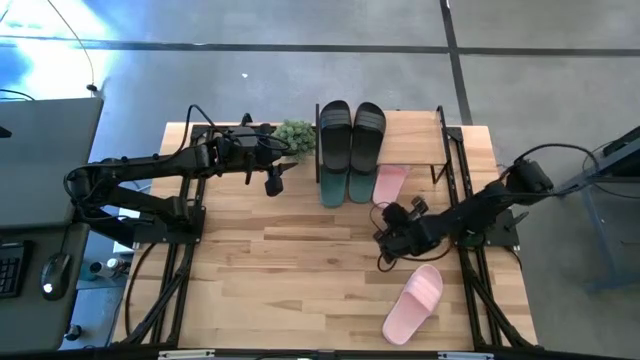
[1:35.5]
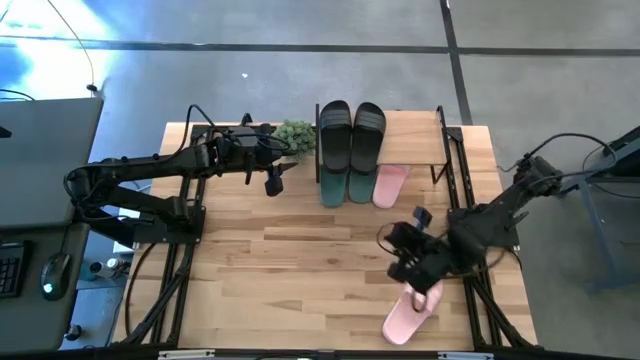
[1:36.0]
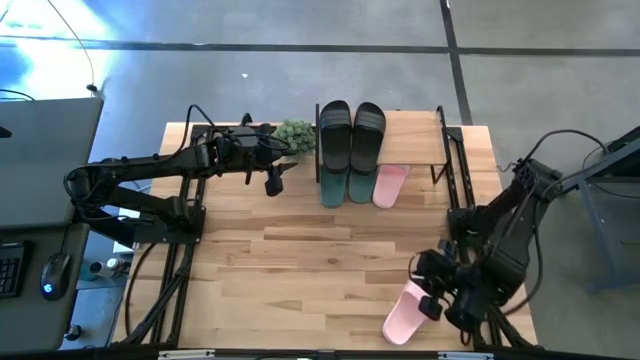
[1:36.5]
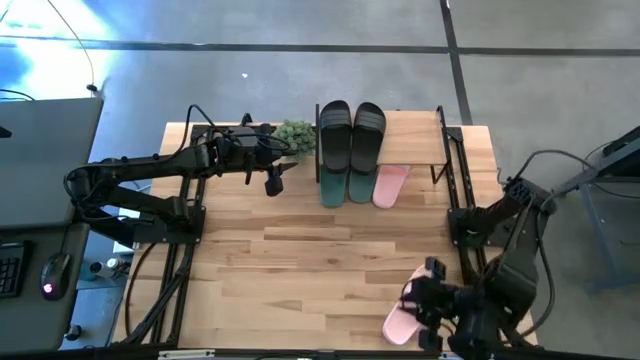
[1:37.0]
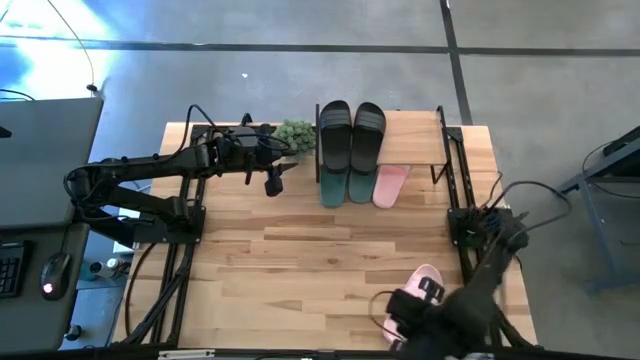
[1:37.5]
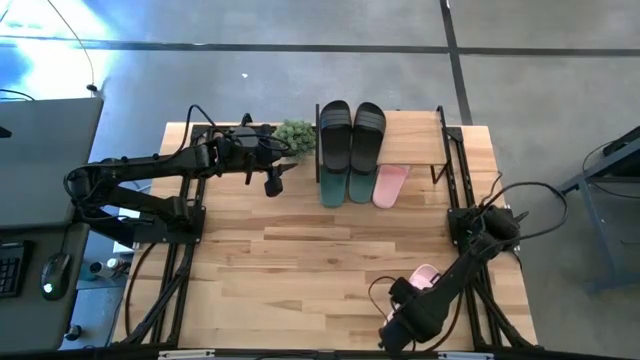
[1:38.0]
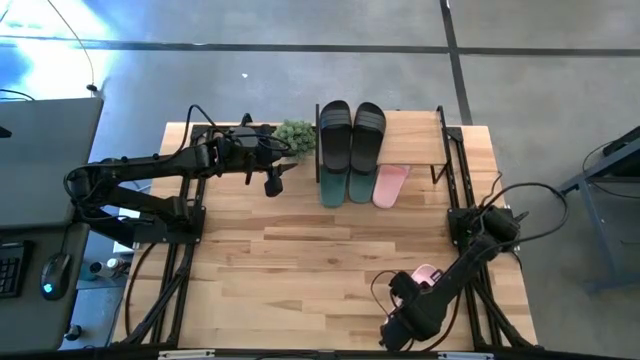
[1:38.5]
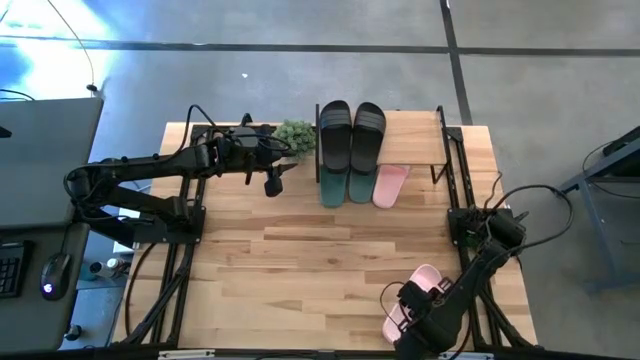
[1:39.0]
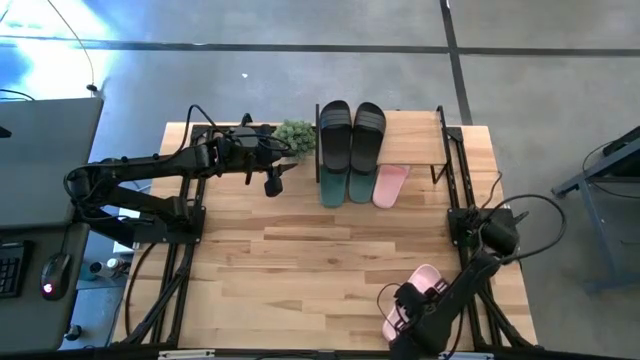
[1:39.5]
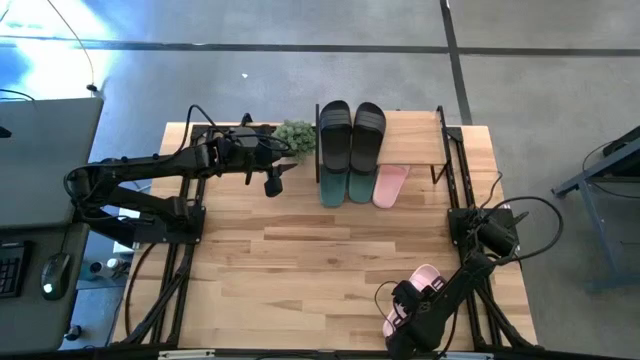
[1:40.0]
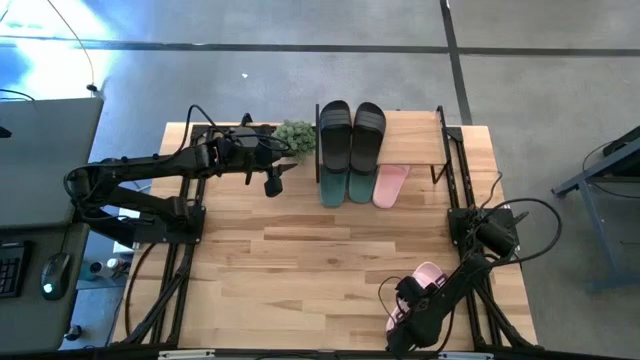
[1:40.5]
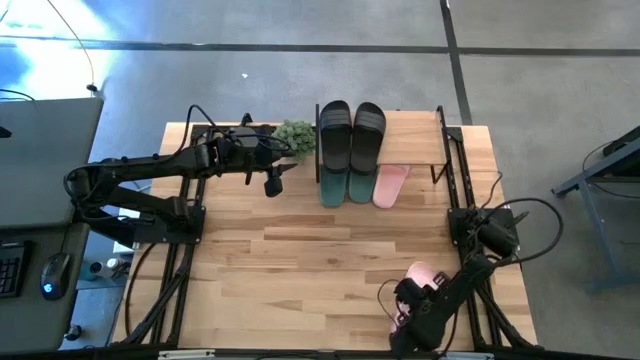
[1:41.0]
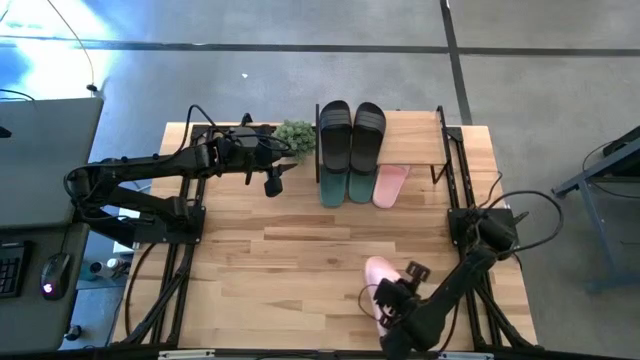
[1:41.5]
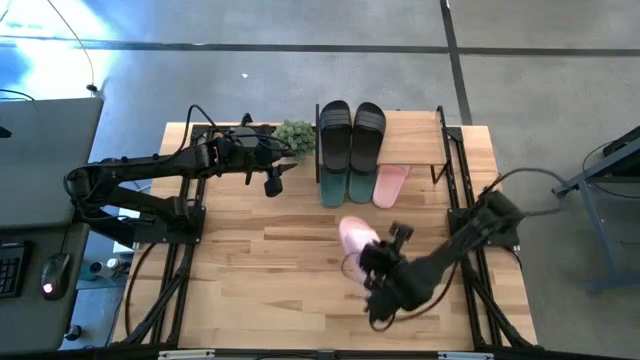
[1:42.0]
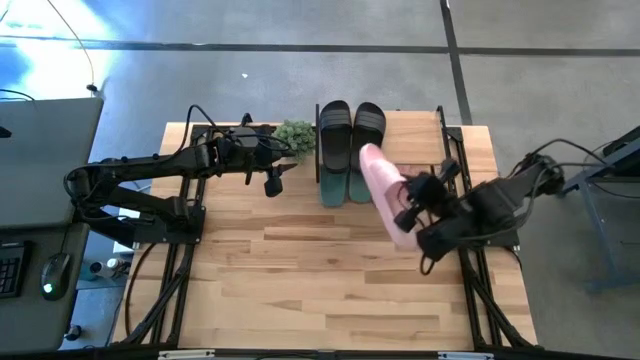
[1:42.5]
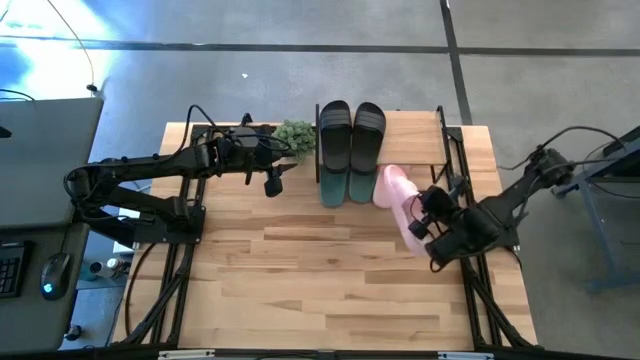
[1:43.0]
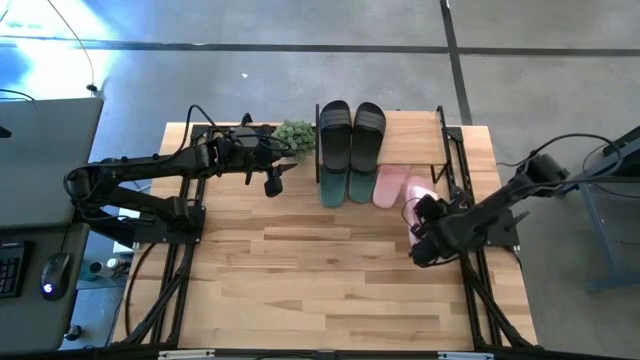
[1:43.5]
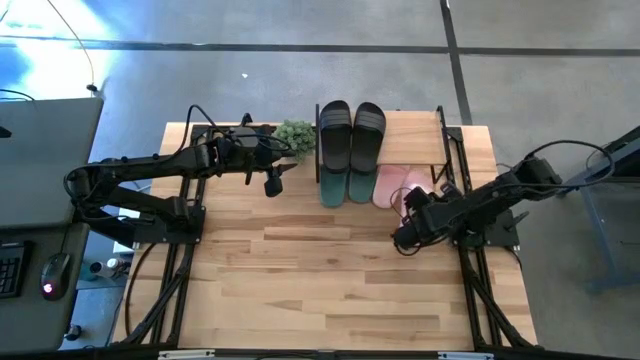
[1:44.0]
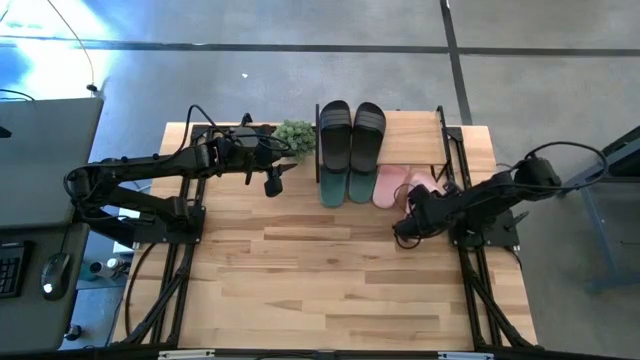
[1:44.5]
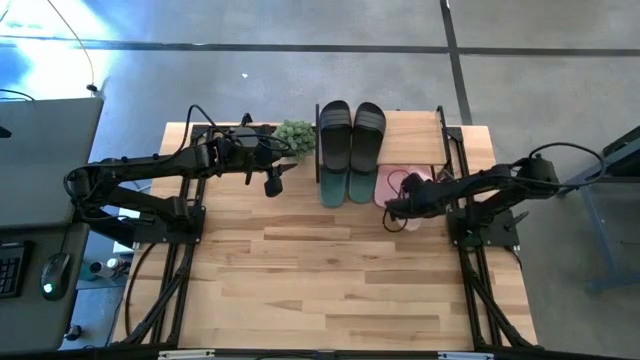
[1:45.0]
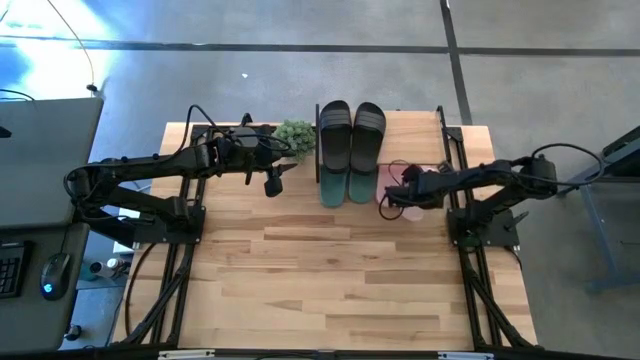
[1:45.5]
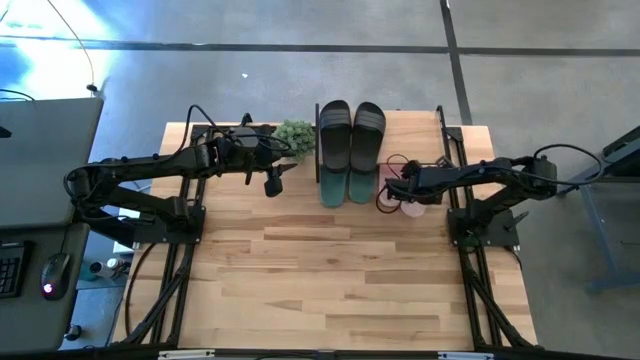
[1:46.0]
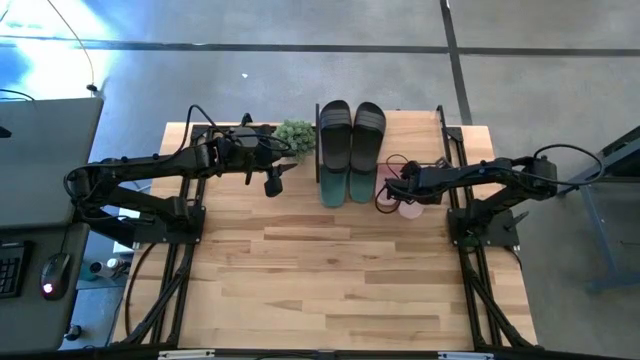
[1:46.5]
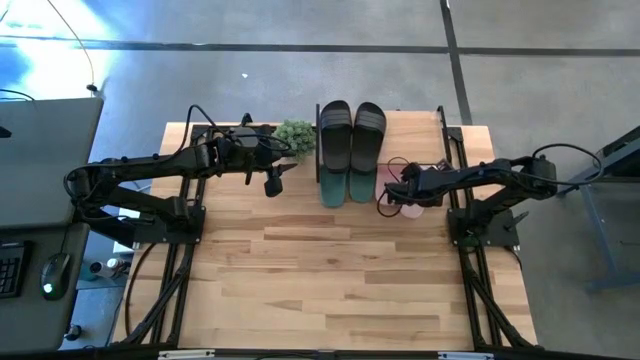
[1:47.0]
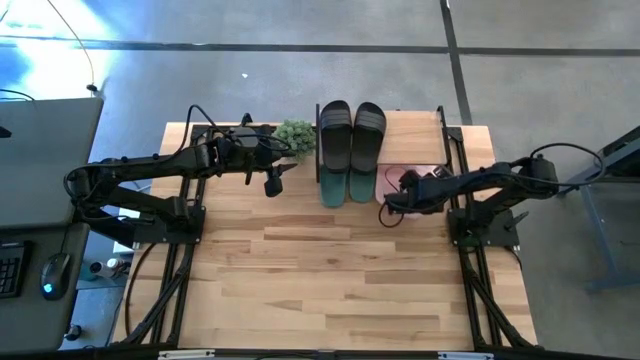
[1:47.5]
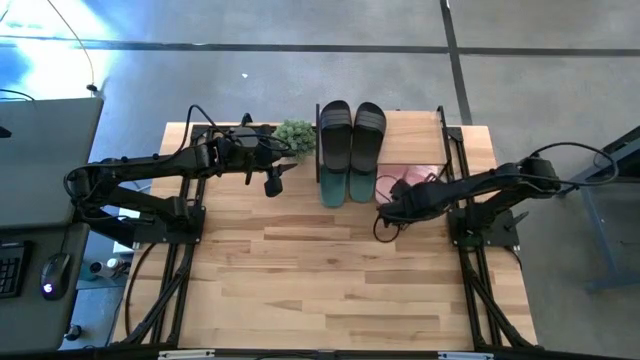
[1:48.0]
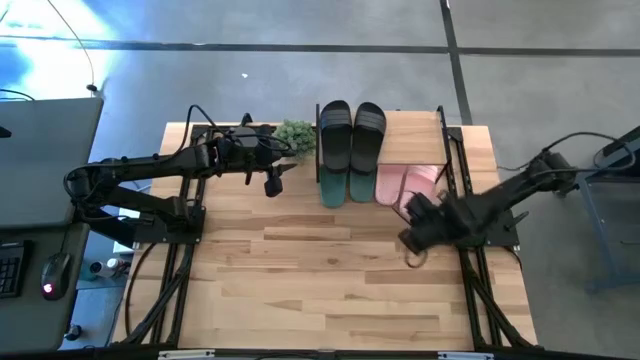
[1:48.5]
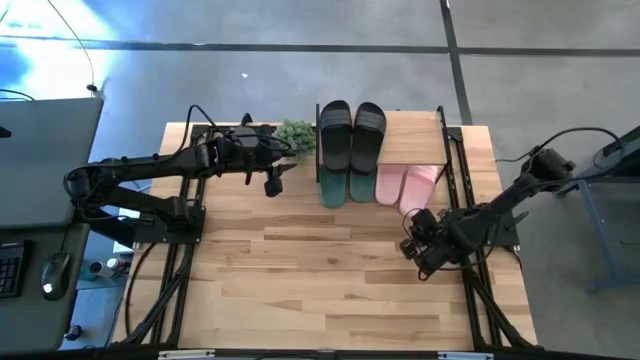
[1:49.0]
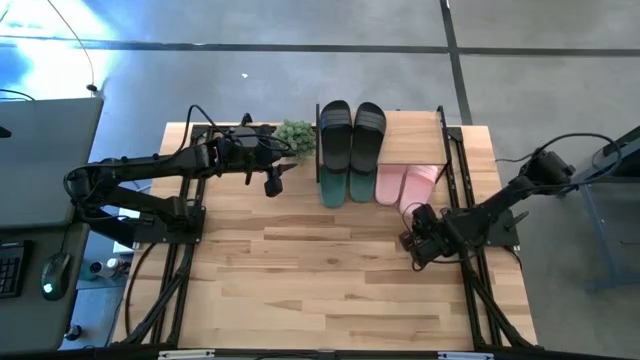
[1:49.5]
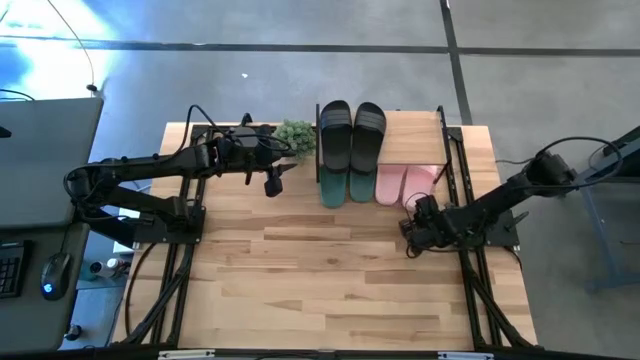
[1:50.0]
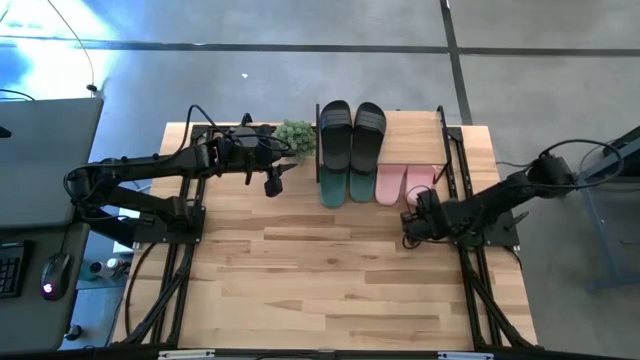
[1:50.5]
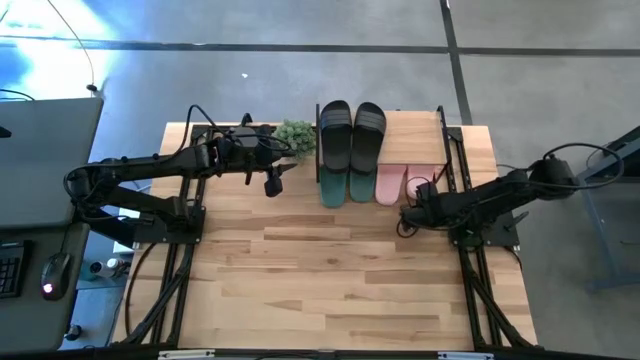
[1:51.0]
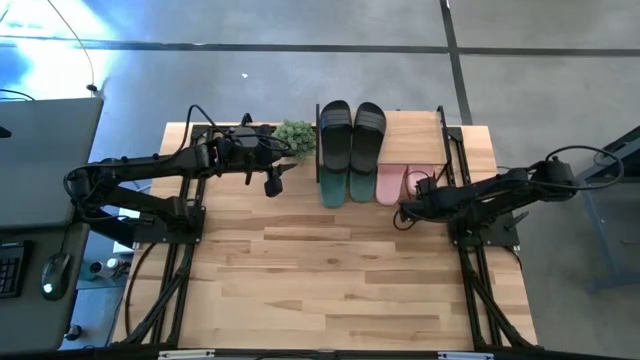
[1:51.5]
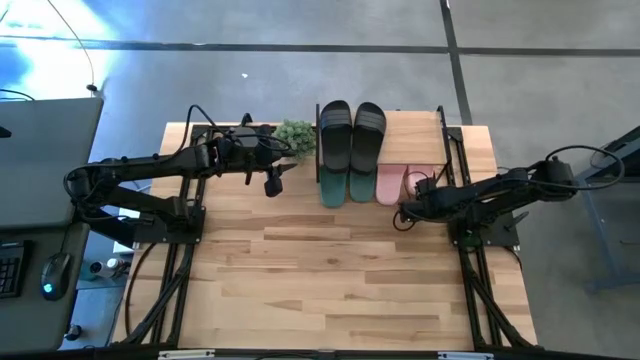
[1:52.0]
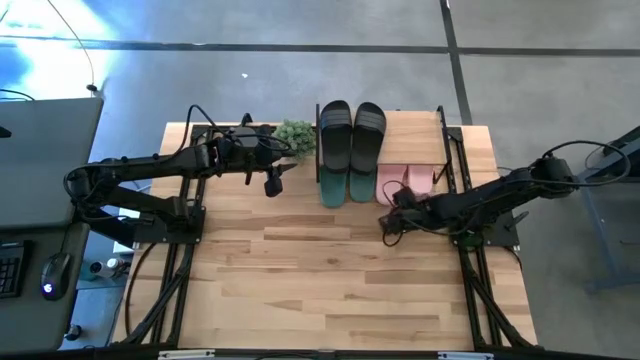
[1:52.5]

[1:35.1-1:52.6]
Task: Pick and place slides into the shelf
Put the pink slide under the shelf

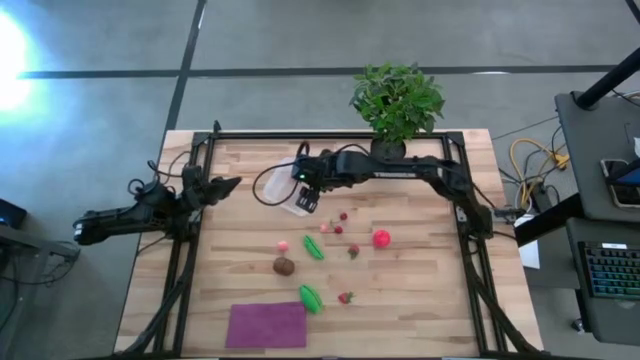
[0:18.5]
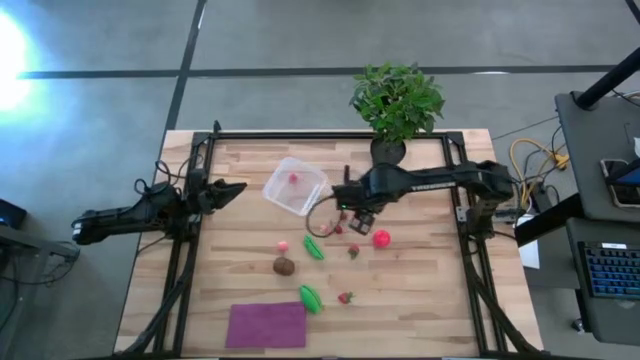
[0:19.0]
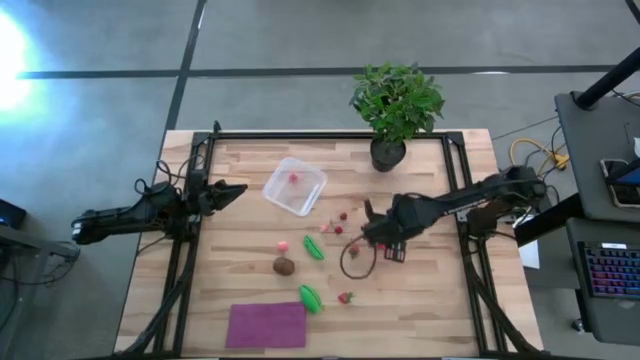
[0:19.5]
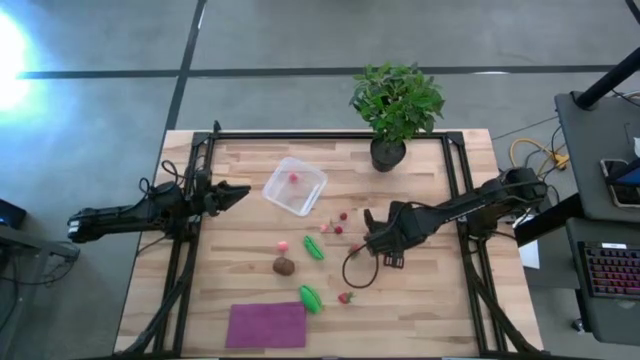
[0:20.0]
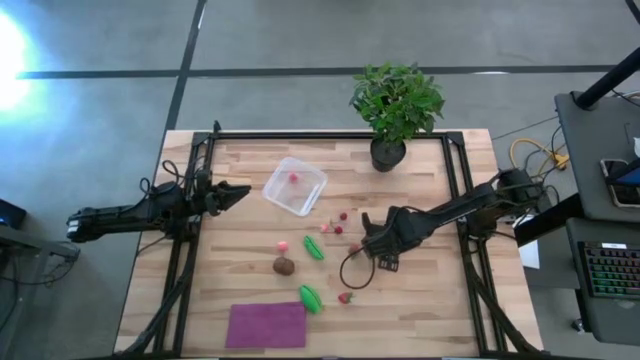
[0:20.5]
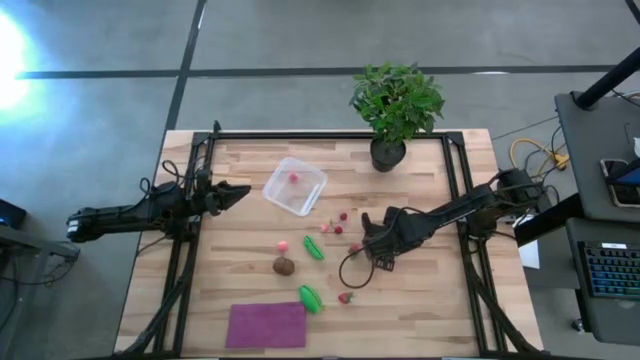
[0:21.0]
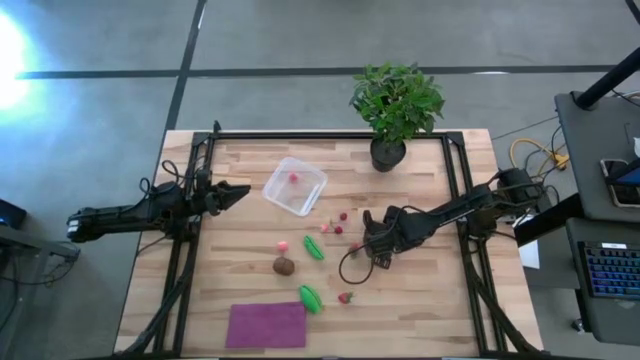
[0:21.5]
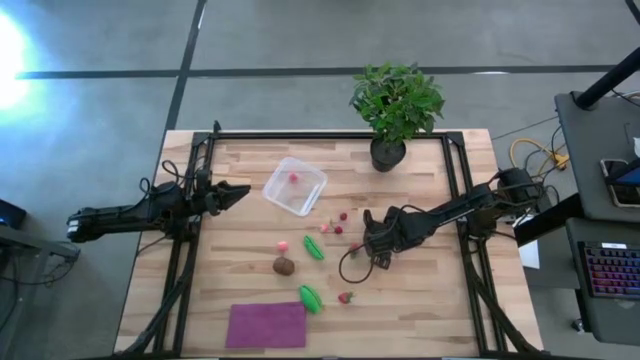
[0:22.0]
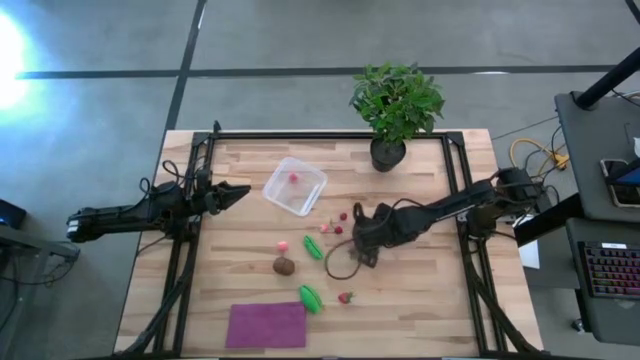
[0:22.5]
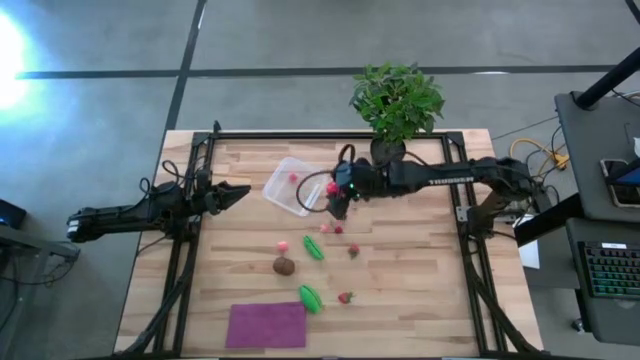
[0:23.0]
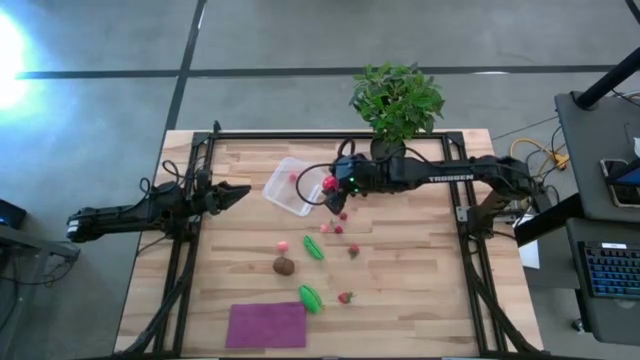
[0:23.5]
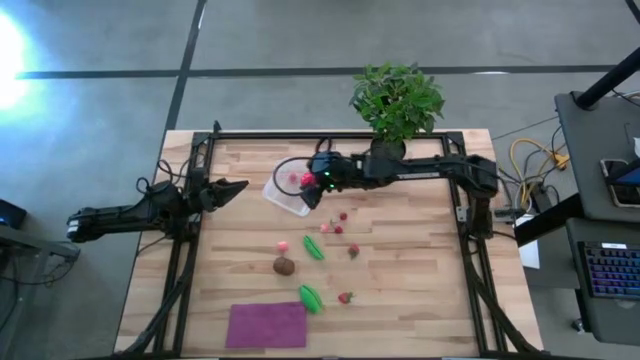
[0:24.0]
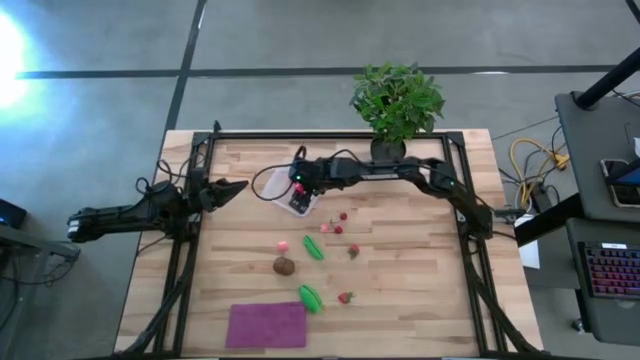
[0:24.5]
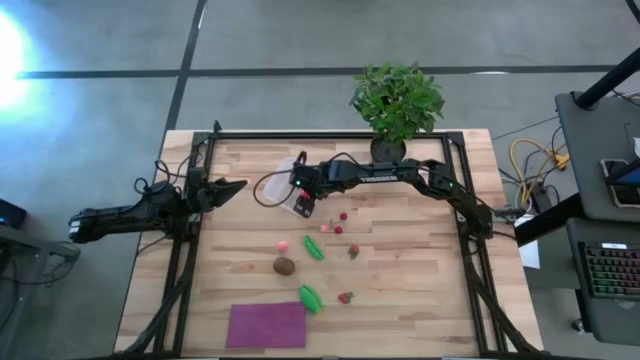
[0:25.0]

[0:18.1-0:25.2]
Task: Pick and placing Produce into tupperware
Put the tomato into the transparent bin
